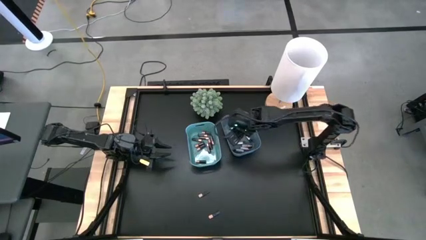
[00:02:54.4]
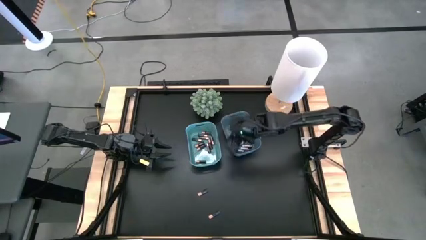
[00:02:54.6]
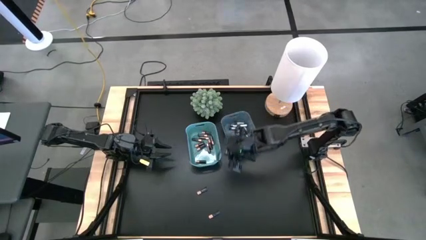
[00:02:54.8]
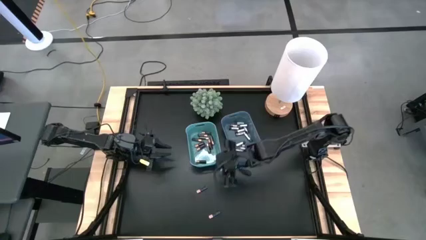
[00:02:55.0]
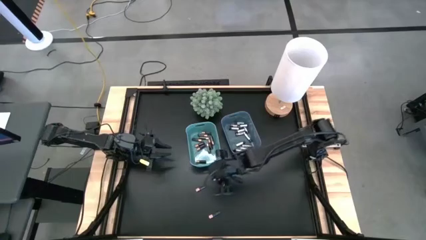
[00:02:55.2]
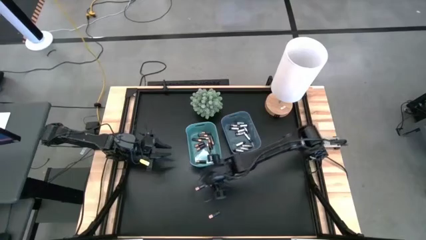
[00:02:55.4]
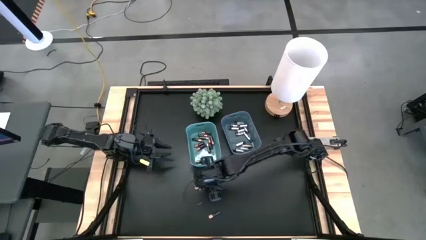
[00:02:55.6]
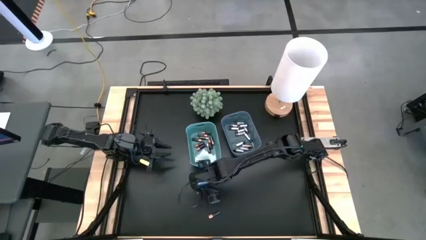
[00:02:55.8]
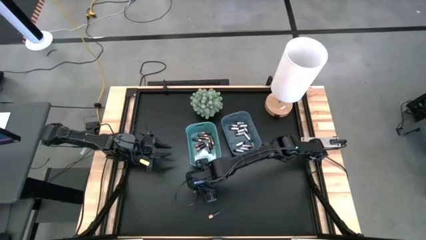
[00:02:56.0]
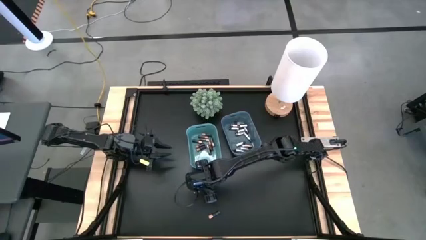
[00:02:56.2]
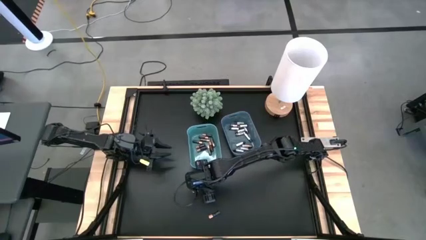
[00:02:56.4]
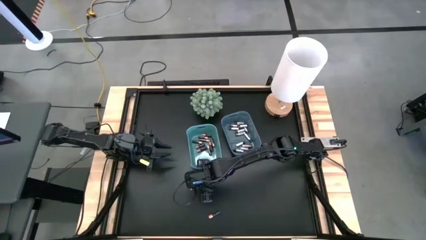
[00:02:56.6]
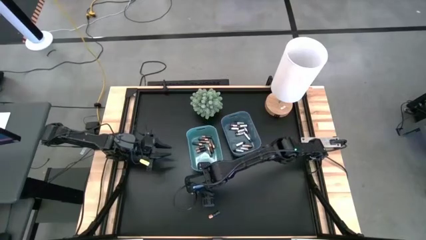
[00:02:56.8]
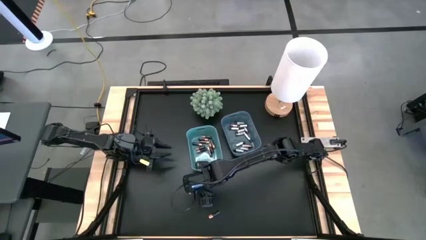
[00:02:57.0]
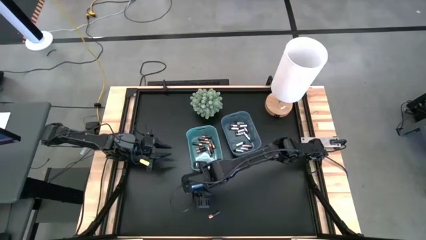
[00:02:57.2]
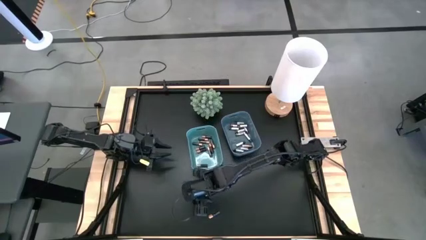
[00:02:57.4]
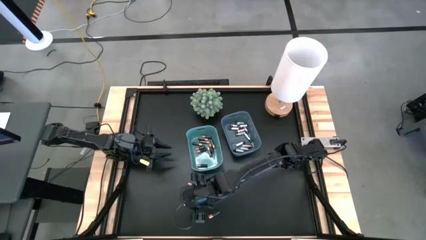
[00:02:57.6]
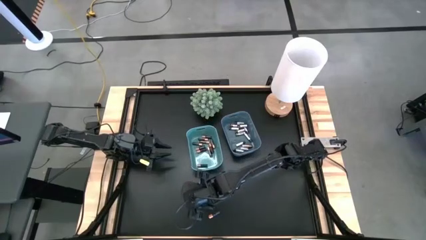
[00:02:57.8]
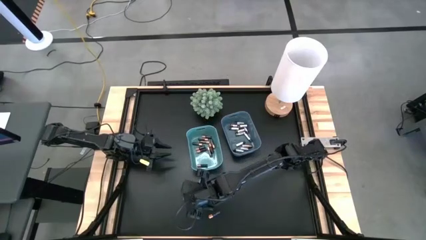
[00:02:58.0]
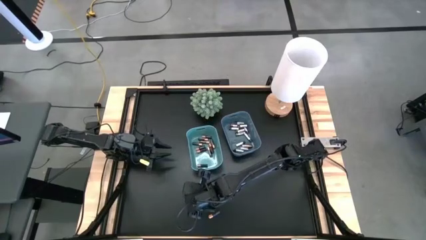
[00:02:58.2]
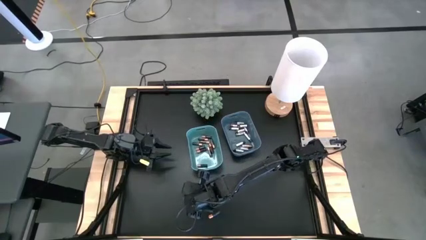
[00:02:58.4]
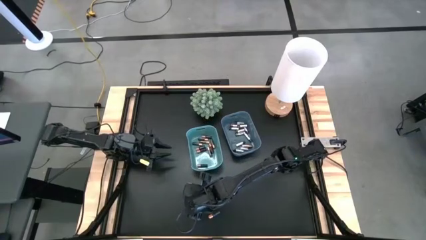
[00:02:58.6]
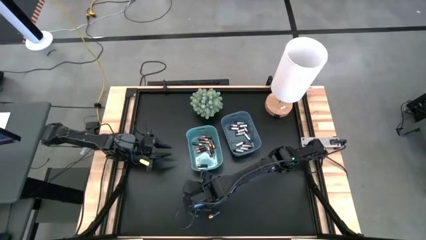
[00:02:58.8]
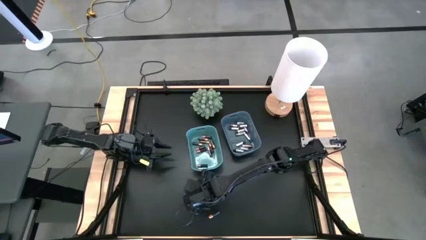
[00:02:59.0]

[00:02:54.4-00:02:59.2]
Task: Sort batteries
Put the black battery into the green bin

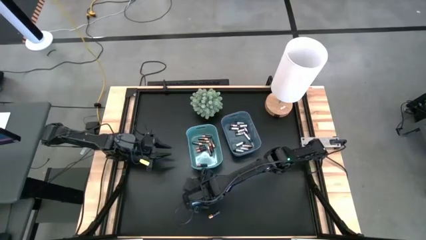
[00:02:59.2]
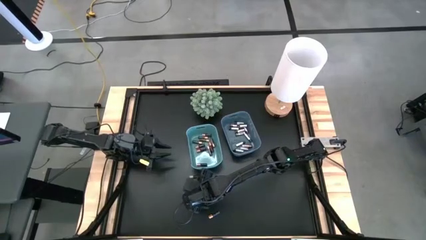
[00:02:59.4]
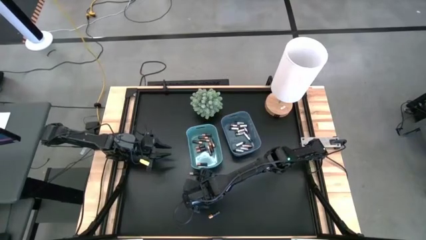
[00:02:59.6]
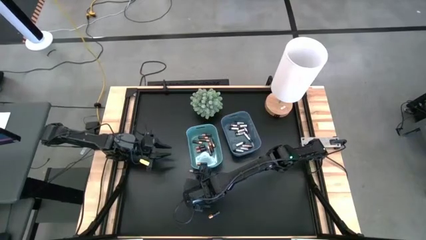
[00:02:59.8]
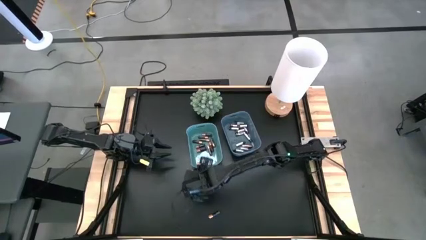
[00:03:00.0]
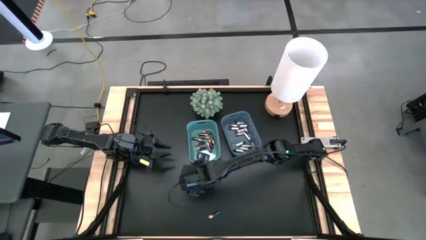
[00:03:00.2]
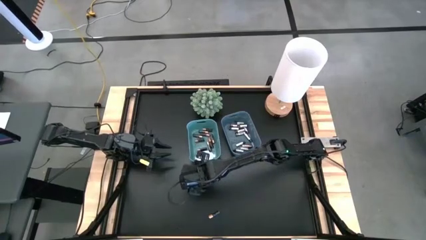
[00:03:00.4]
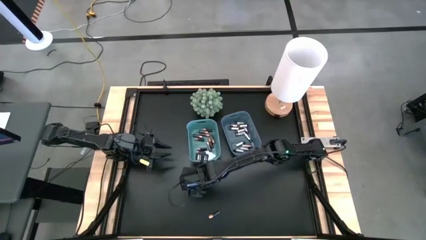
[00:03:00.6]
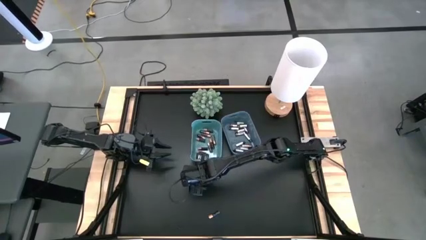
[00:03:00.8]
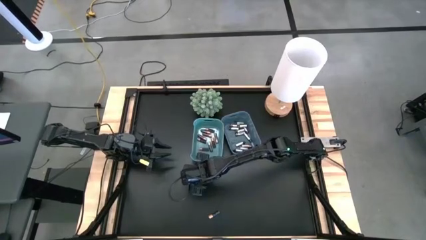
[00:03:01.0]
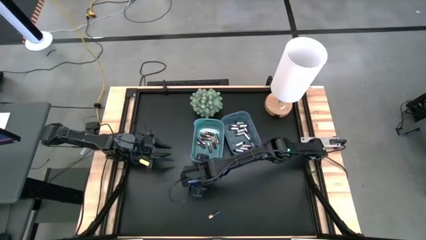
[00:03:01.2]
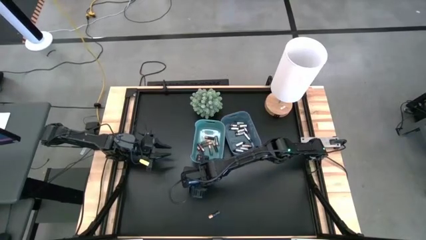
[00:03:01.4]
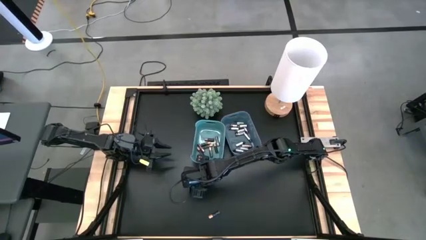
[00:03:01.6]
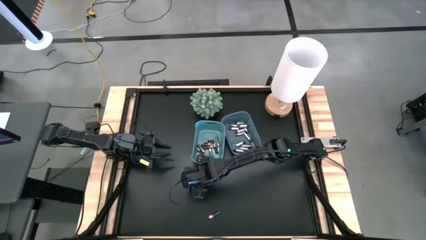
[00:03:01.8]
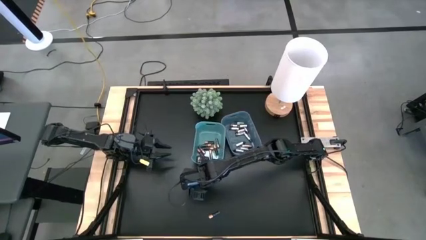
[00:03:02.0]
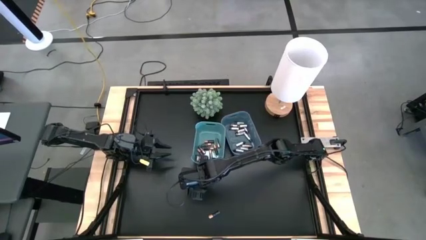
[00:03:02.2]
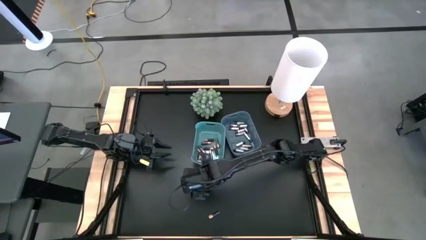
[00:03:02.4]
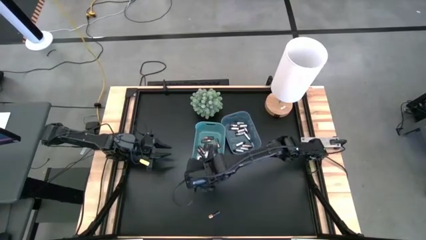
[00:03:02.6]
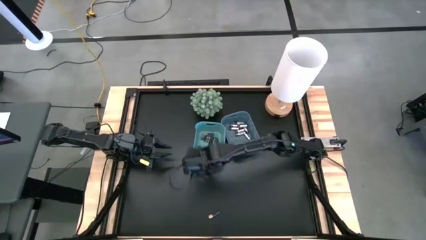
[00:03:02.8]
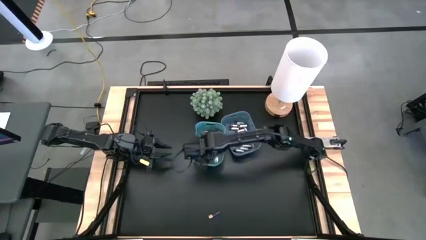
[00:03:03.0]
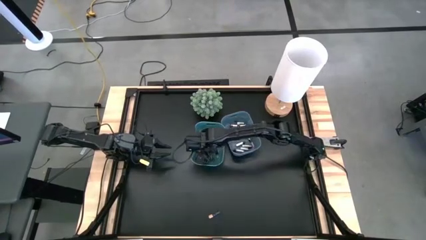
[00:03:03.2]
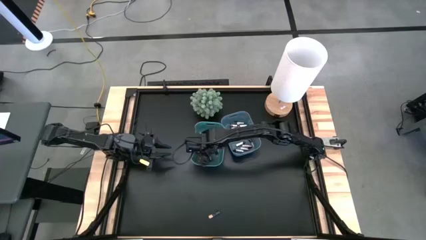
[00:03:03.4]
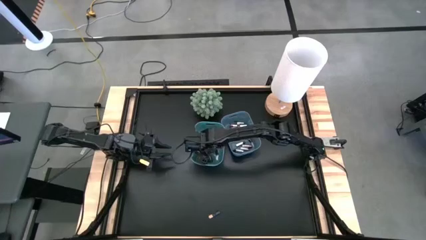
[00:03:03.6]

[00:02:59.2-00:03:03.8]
Put the black battery into the green bin

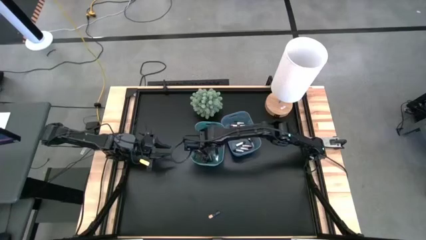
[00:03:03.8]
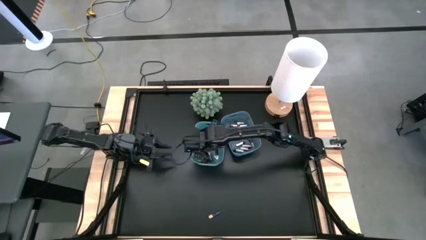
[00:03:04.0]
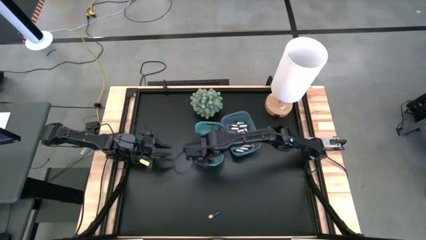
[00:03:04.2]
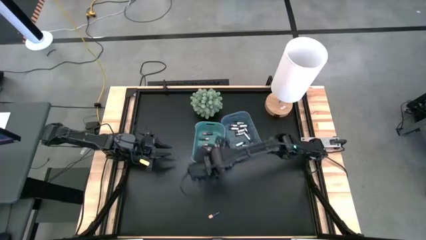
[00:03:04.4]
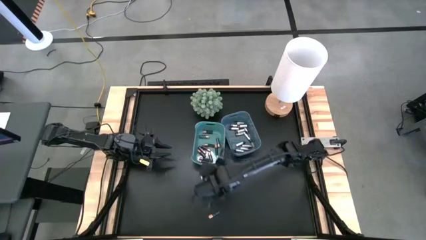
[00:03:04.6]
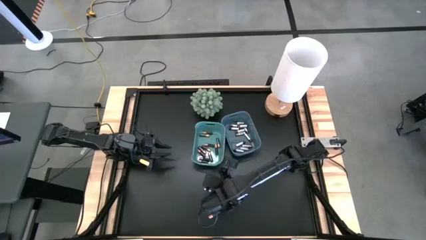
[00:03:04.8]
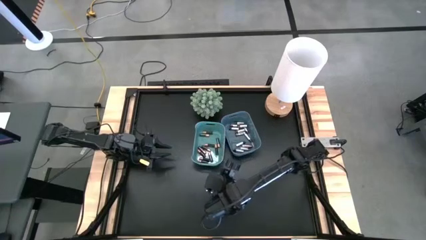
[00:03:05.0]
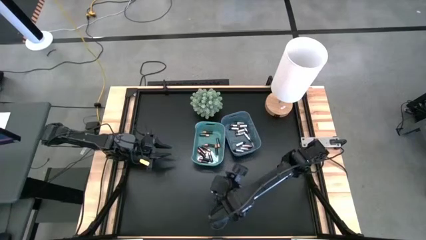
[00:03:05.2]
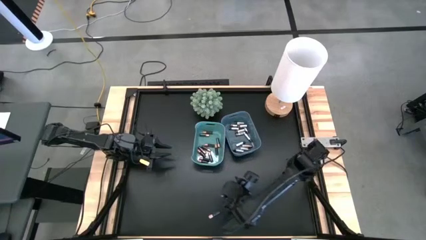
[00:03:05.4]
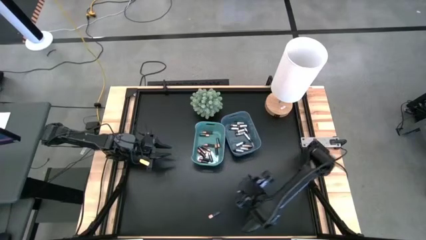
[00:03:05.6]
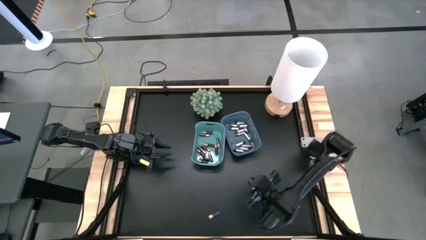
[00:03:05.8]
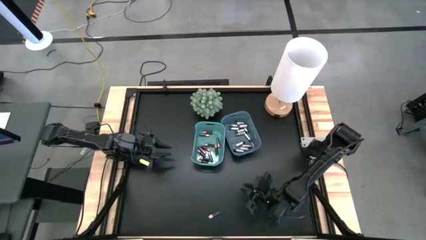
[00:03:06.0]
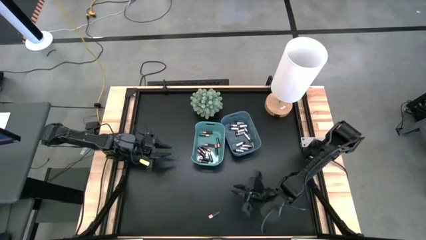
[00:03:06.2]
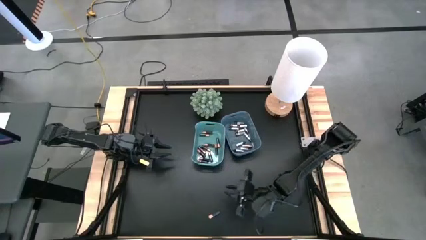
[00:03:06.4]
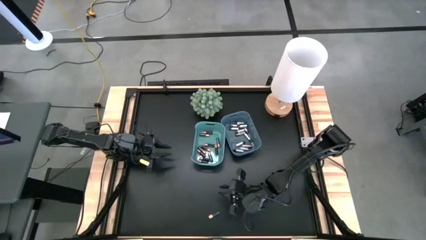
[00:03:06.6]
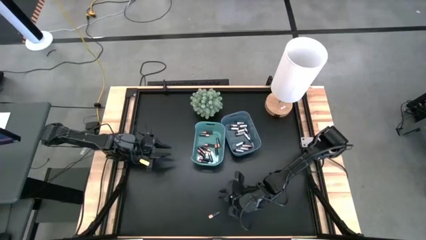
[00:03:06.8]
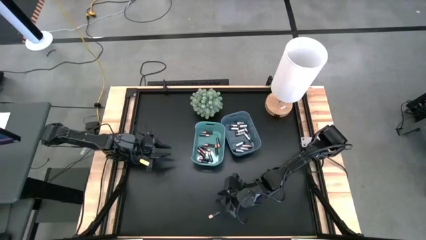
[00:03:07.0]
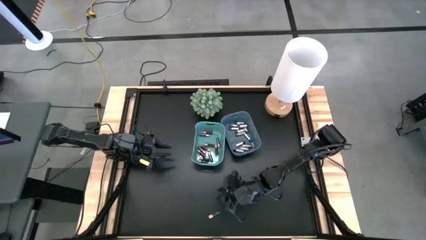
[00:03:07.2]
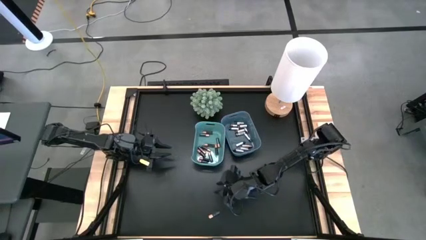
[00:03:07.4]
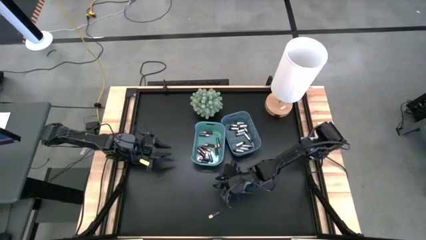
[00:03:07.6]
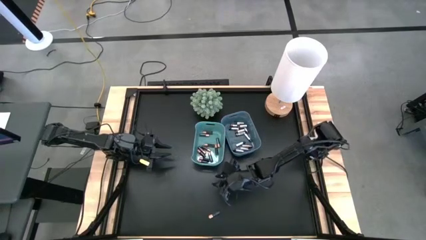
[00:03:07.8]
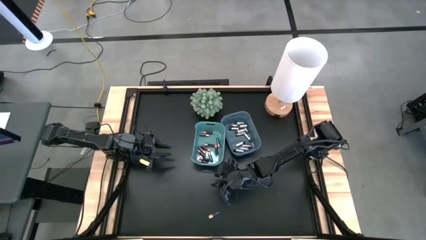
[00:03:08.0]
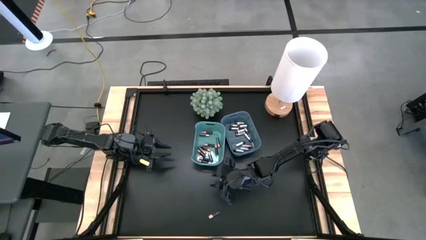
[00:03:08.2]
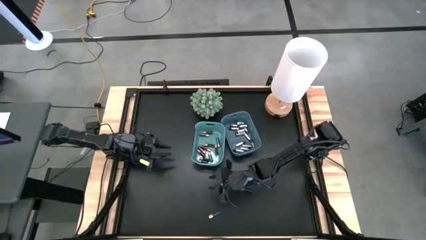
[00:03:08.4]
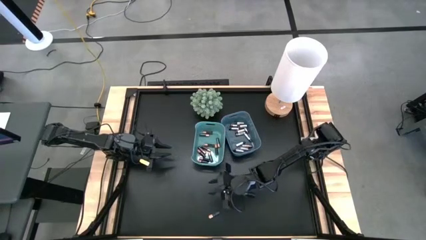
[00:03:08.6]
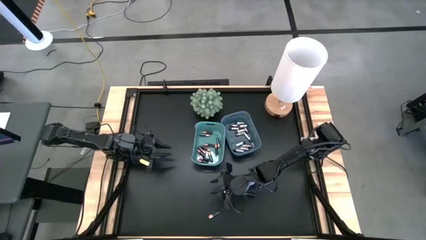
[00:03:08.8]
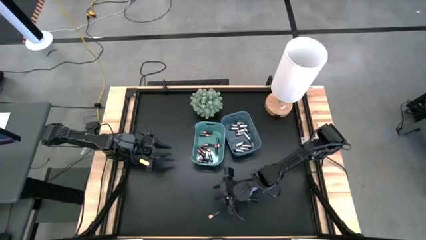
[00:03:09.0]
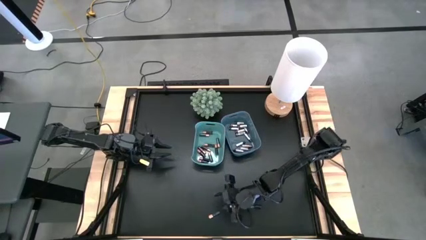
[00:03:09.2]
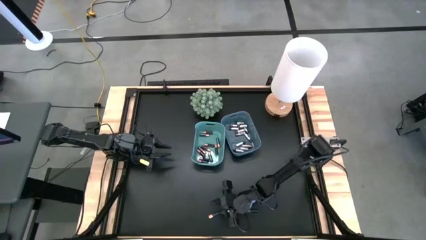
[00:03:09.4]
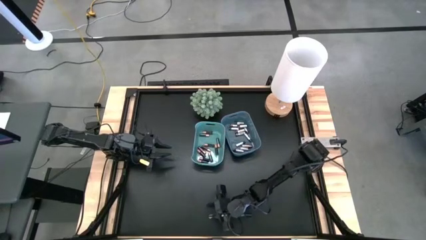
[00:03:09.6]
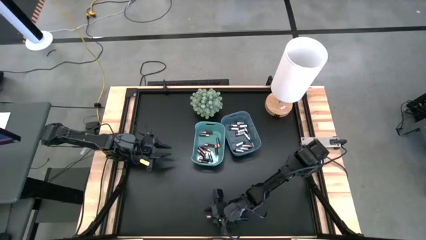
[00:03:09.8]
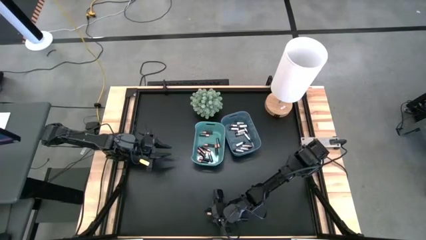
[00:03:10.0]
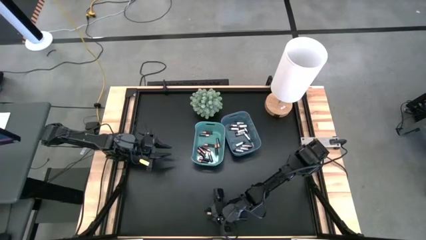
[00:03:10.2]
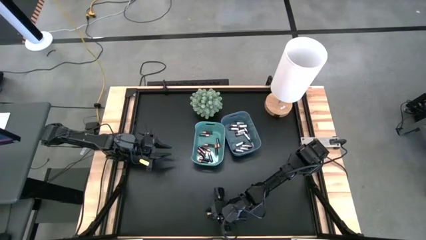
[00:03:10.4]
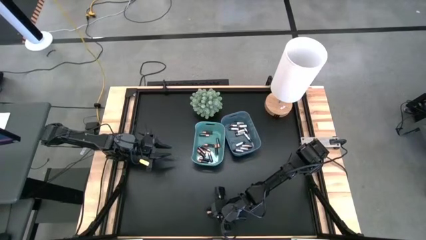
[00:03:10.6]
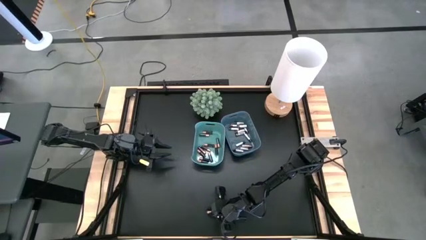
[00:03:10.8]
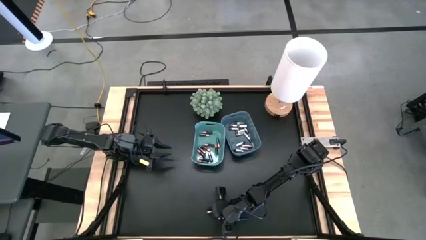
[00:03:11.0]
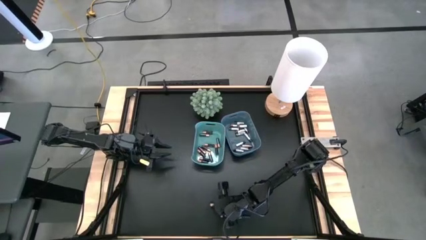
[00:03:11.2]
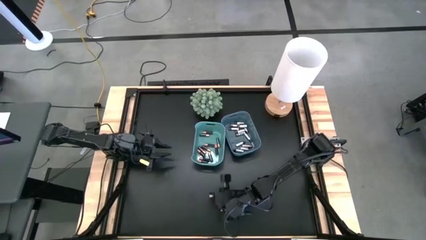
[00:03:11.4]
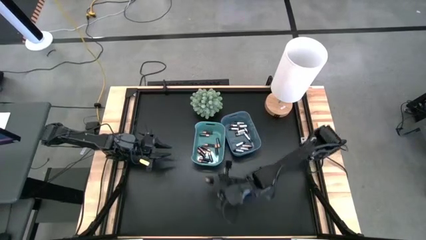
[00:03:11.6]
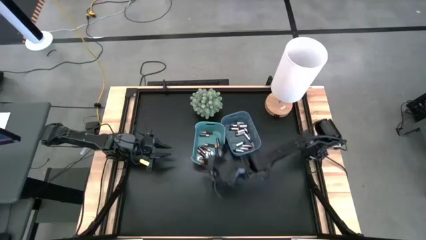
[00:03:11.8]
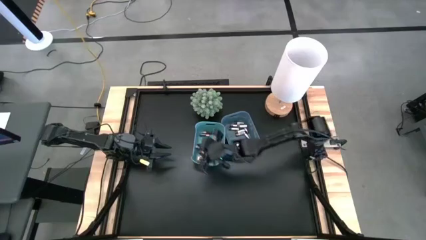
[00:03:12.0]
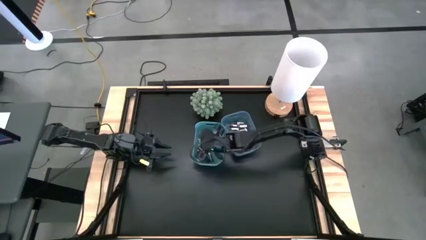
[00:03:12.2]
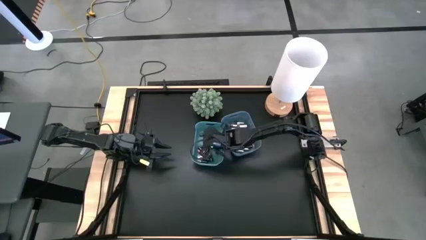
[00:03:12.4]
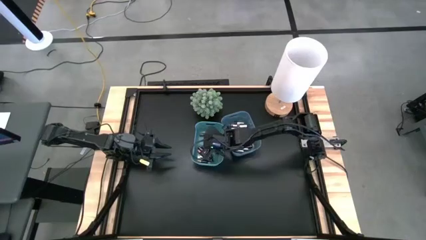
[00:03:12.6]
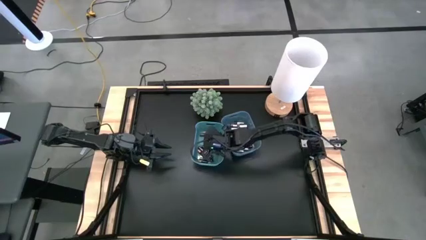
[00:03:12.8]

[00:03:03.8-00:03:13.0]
Put the black battery into the green bin
